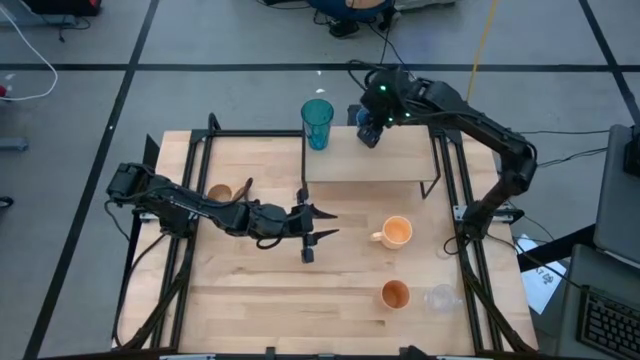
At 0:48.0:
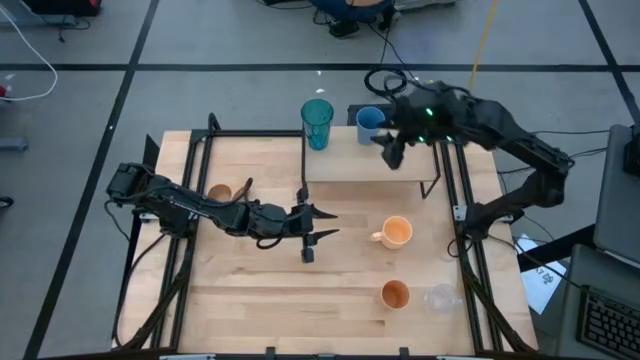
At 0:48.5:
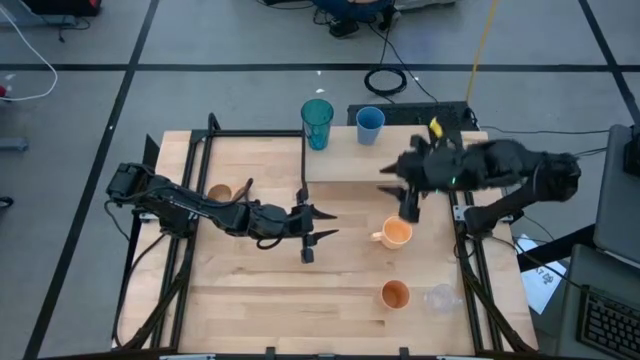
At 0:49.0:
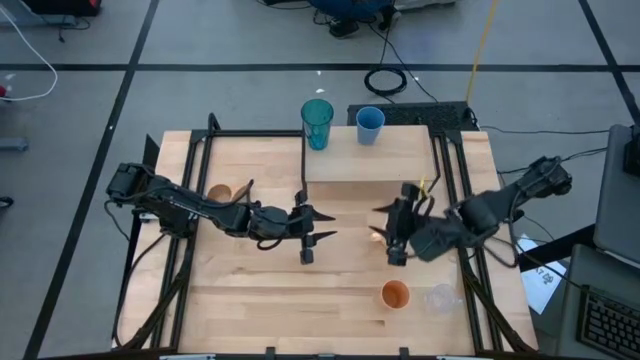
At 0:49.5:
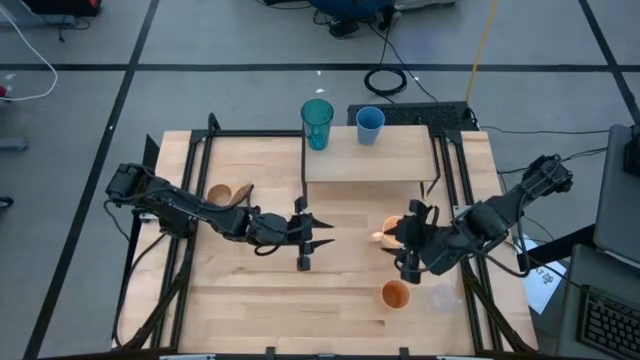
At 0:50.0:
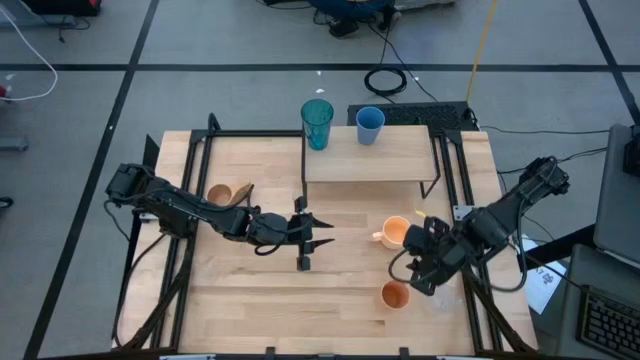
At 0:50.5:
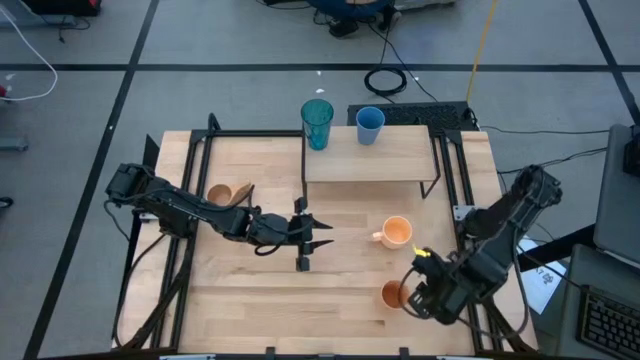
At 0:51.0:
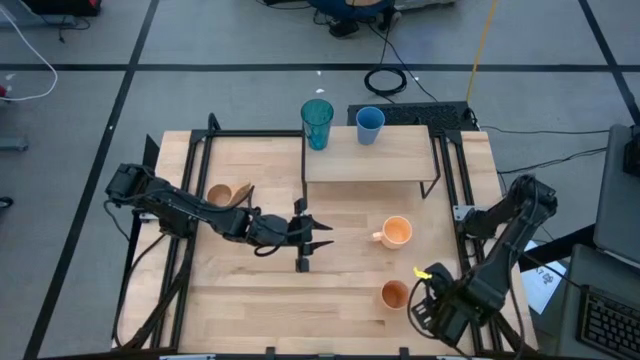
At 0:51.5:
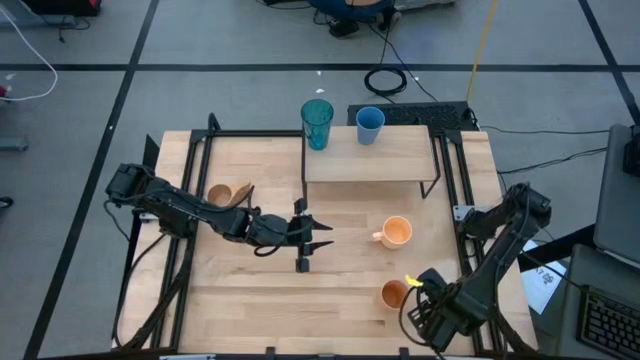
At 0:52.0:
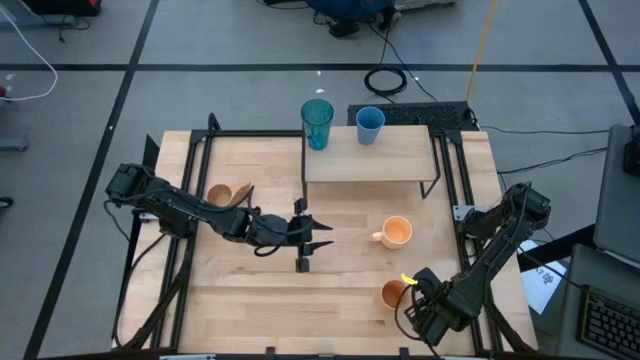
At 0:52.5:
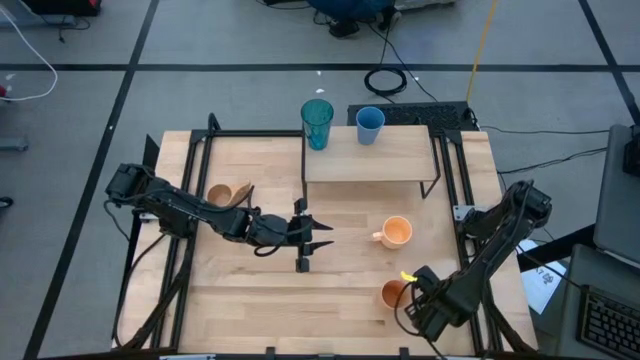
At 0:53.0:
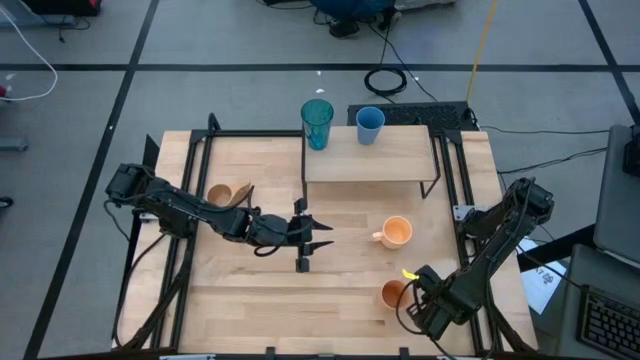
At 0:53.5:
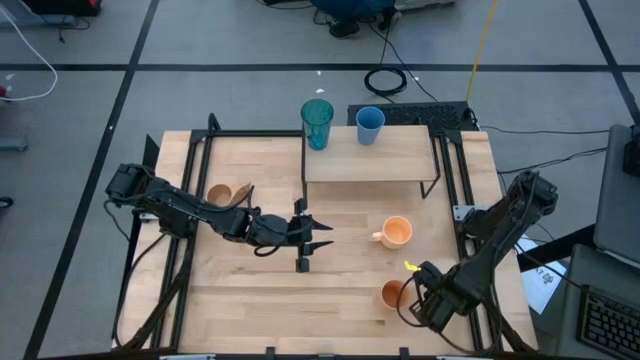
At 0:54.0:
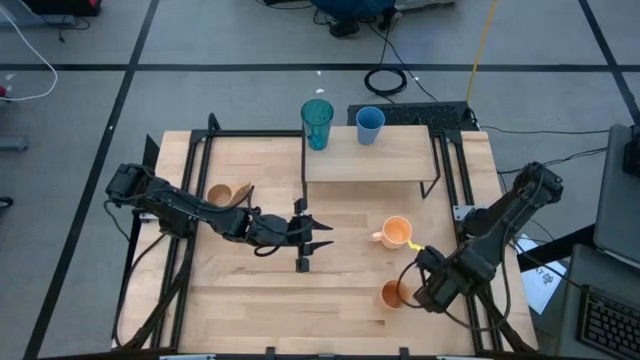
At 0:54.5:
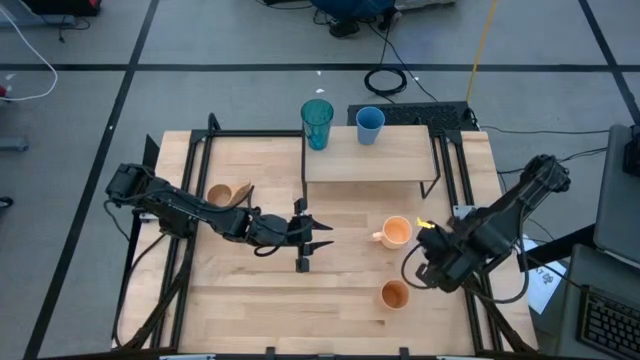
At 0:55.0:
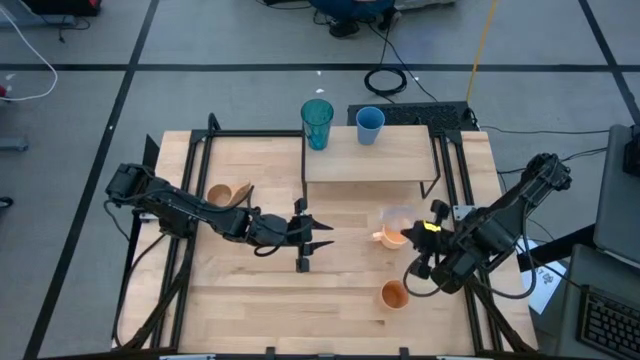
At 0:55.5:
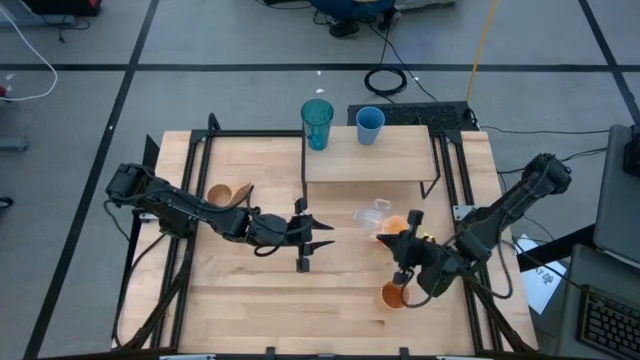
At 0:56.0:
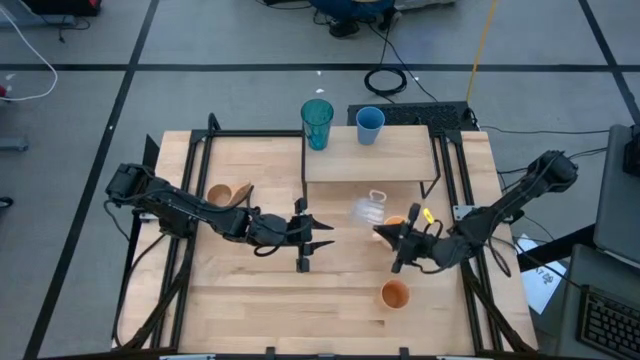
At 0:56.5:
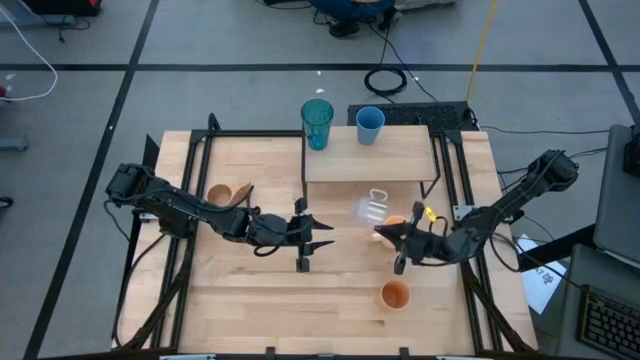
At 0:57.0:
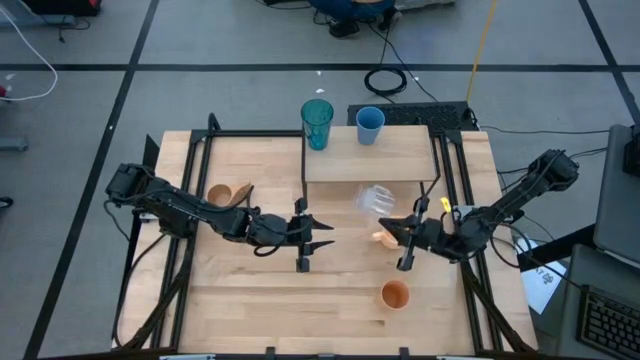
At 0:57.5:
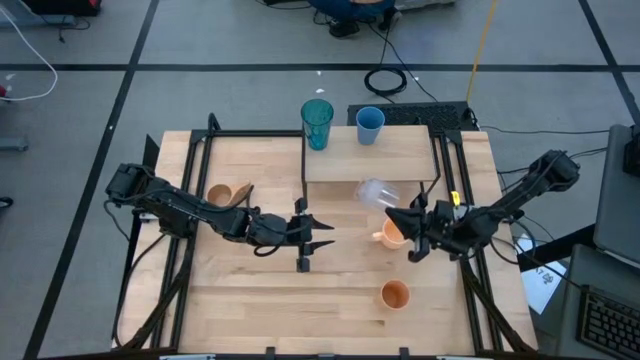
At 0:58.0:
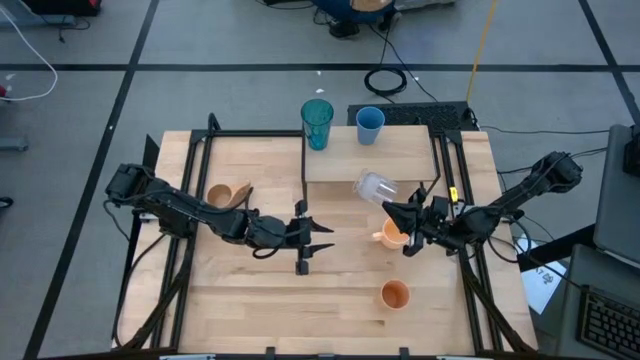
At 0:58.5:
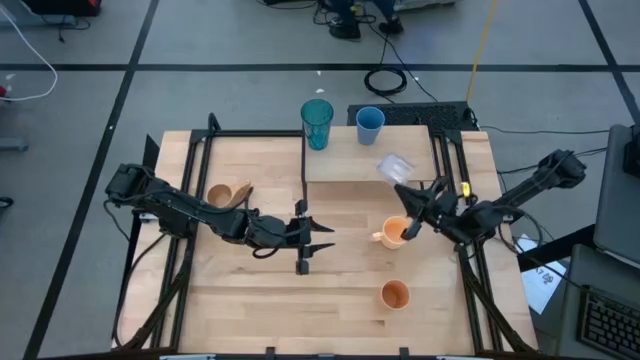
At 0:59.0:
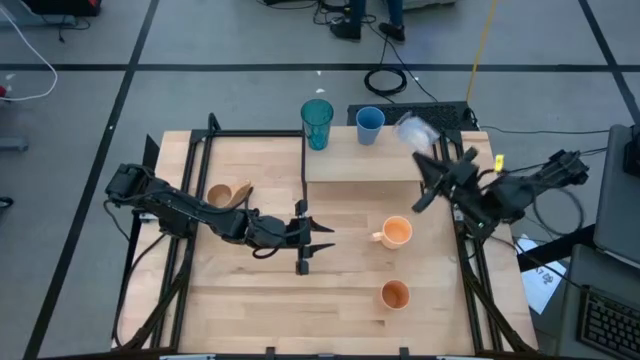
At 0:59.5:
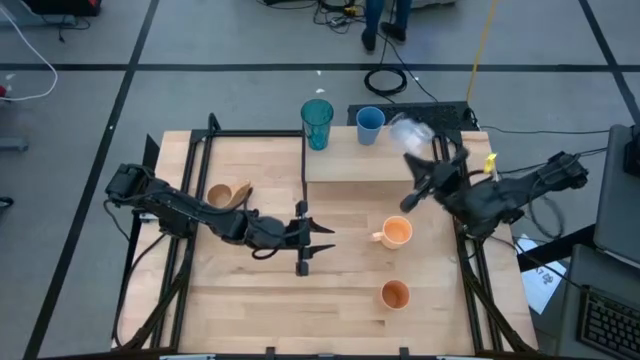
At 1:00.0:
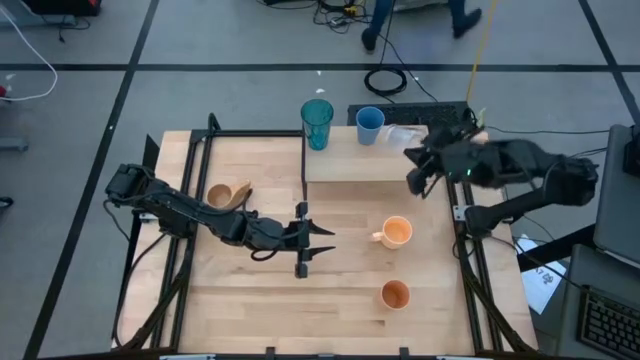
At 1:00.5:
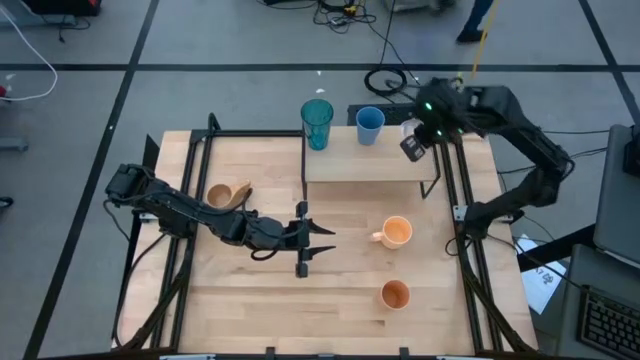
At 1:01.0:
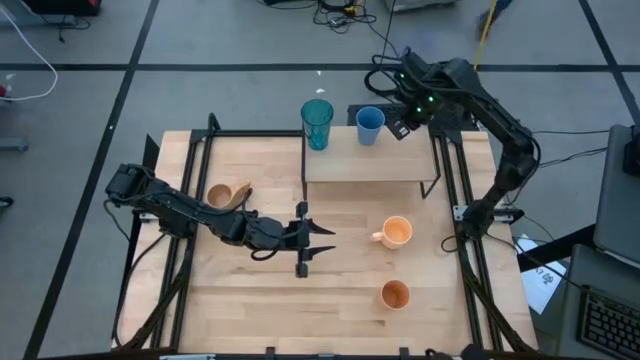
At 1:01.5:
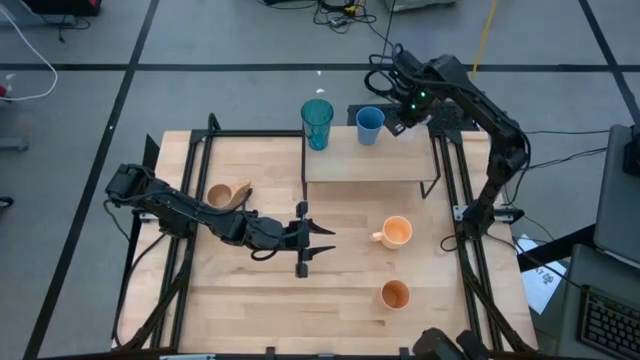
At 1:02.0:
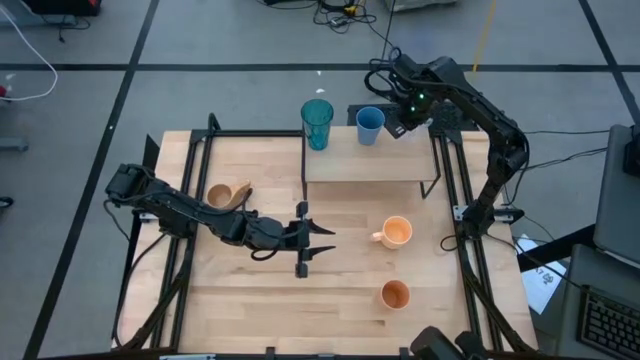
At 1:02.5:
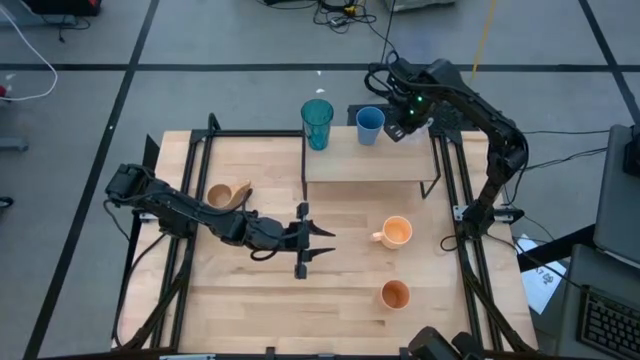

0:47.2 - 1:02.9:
Task: Stack small to large cups/mugs on shelf
Put the transparent mug on the shelf
